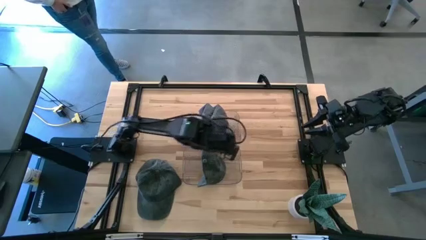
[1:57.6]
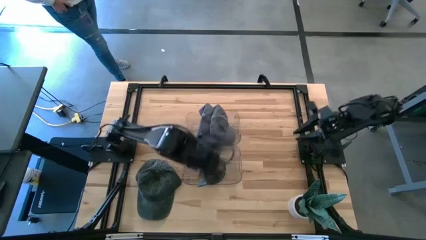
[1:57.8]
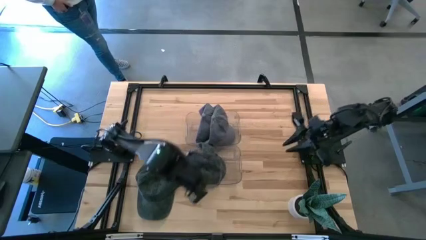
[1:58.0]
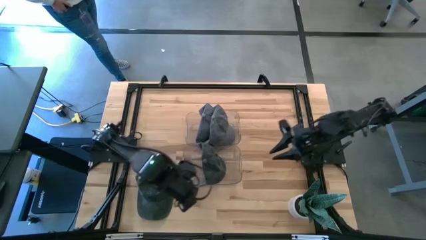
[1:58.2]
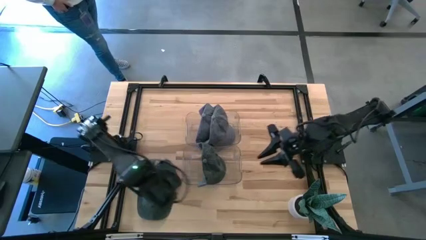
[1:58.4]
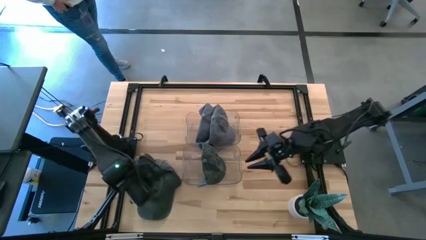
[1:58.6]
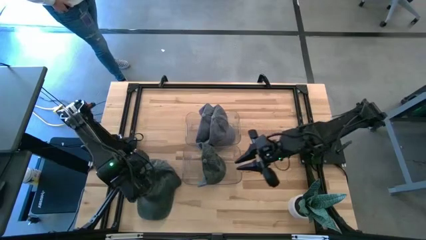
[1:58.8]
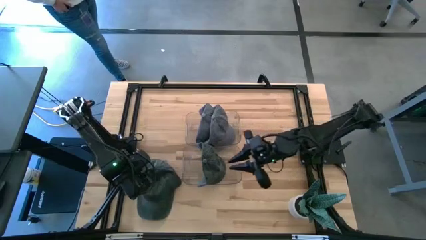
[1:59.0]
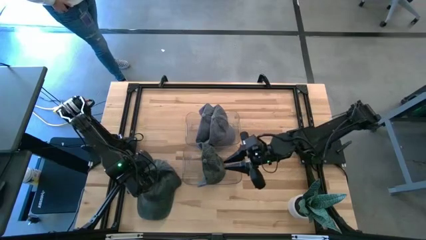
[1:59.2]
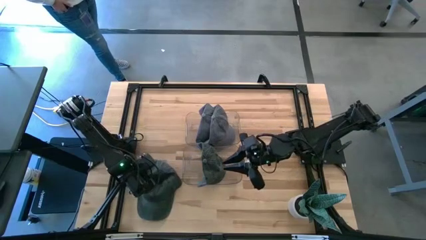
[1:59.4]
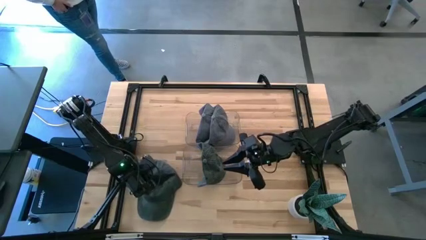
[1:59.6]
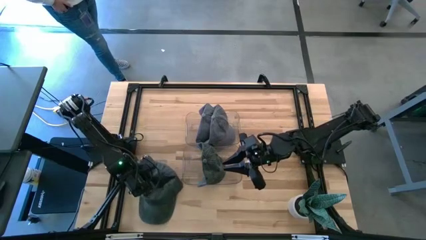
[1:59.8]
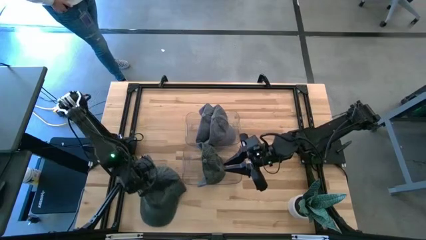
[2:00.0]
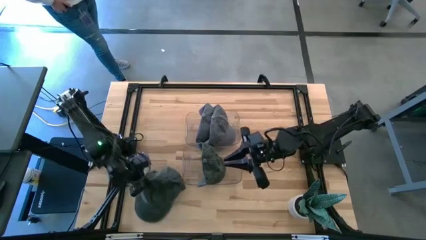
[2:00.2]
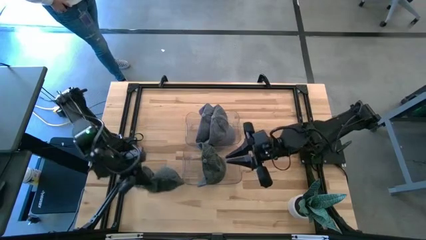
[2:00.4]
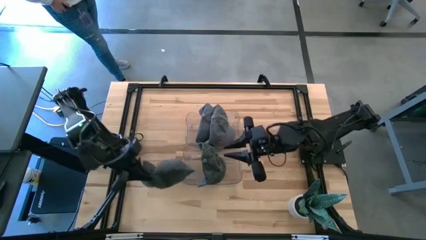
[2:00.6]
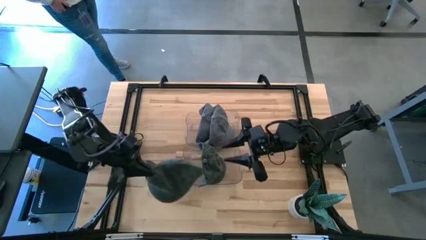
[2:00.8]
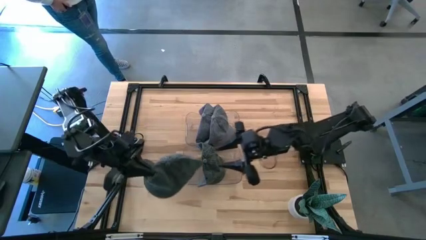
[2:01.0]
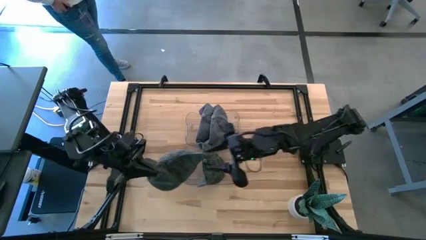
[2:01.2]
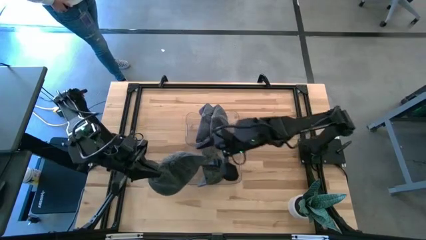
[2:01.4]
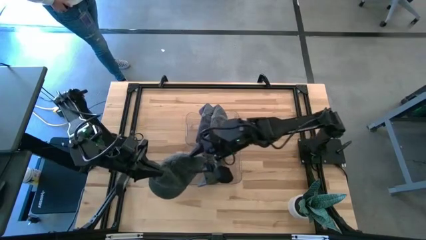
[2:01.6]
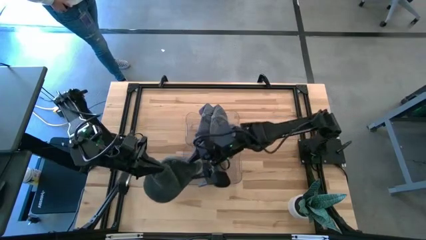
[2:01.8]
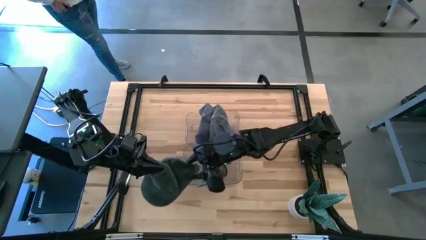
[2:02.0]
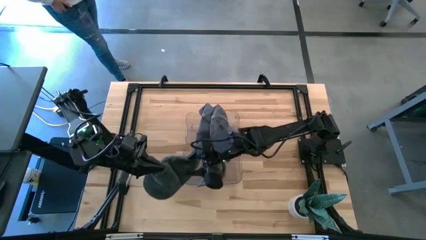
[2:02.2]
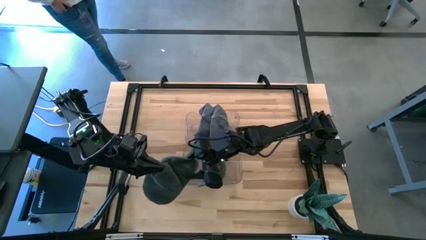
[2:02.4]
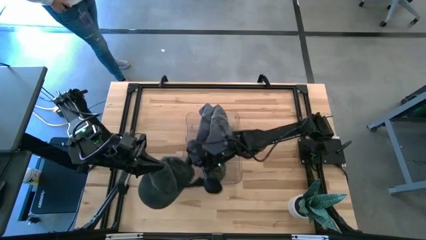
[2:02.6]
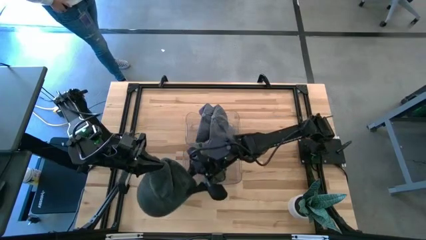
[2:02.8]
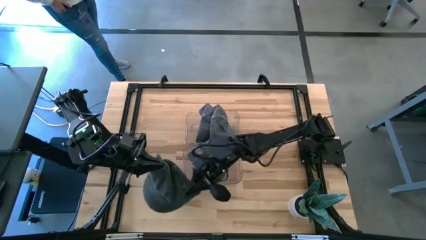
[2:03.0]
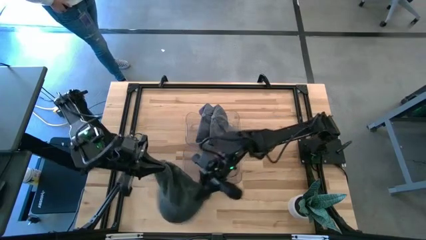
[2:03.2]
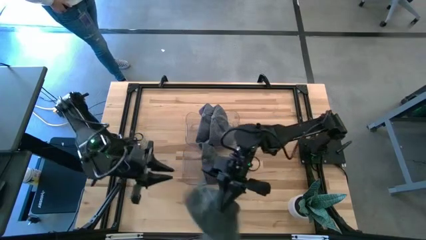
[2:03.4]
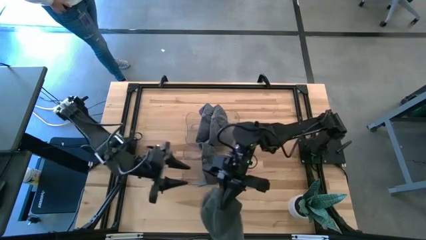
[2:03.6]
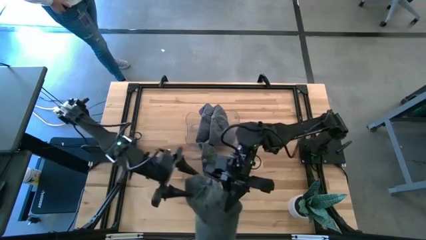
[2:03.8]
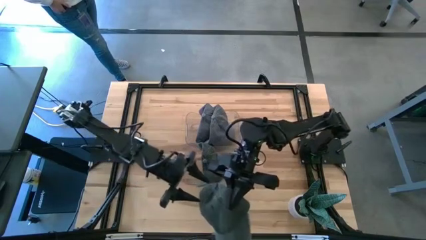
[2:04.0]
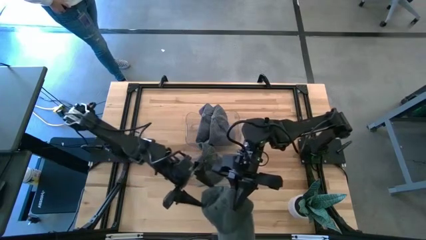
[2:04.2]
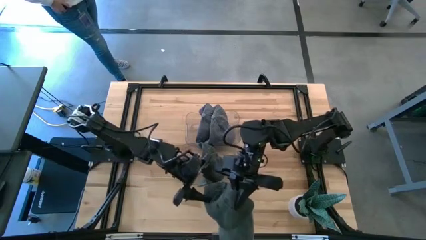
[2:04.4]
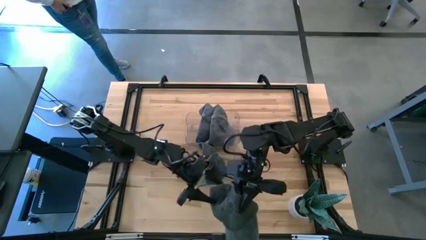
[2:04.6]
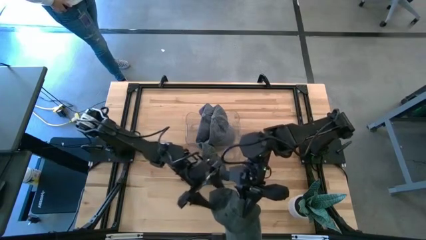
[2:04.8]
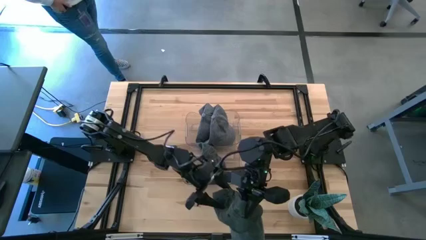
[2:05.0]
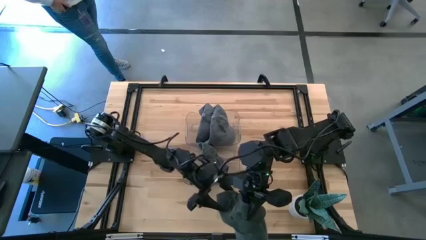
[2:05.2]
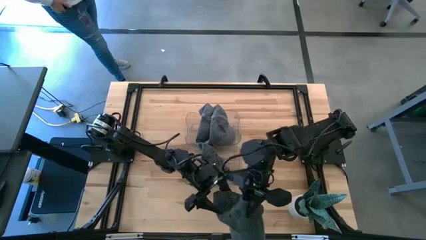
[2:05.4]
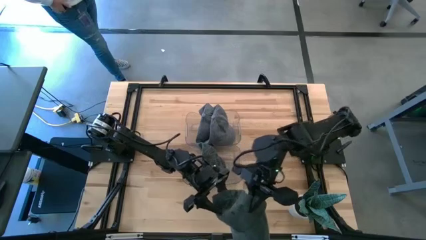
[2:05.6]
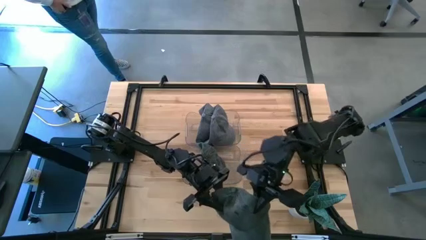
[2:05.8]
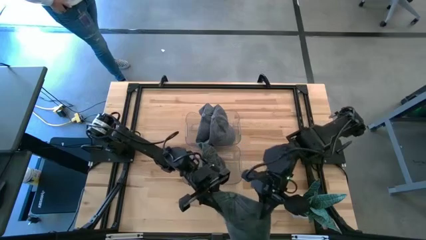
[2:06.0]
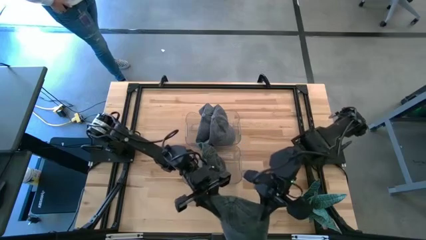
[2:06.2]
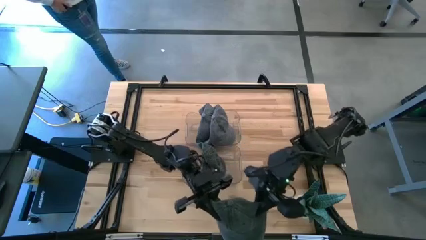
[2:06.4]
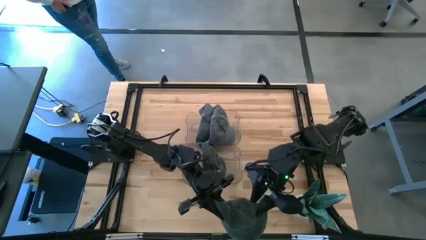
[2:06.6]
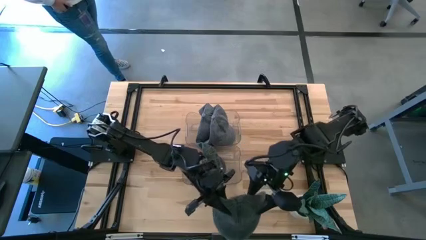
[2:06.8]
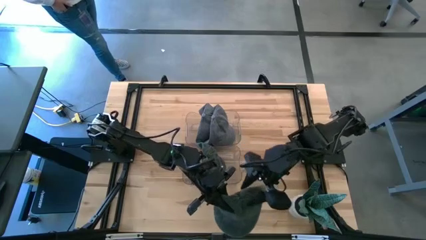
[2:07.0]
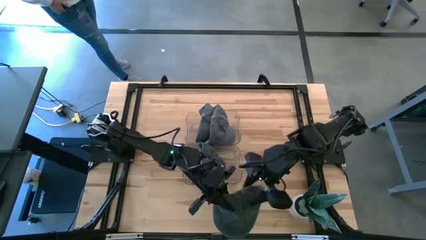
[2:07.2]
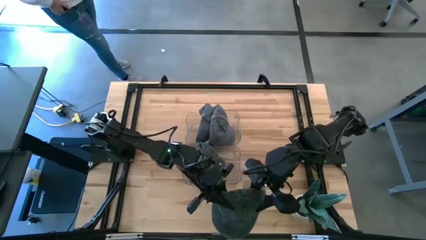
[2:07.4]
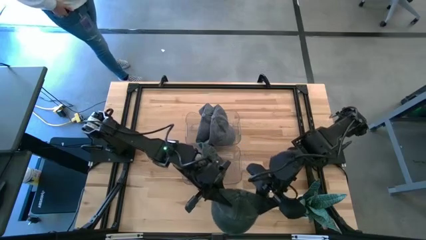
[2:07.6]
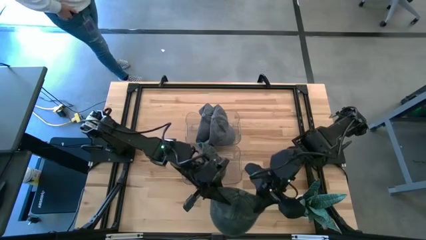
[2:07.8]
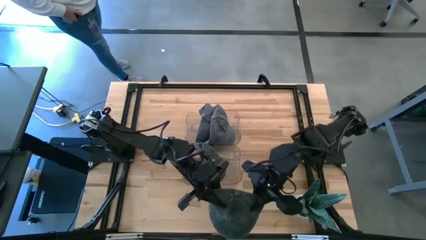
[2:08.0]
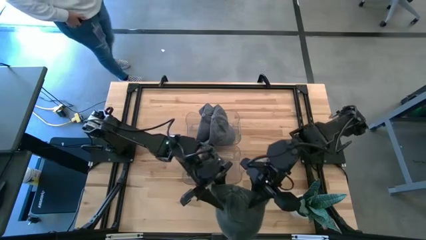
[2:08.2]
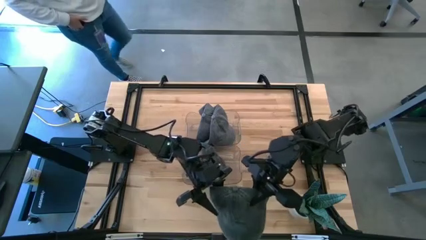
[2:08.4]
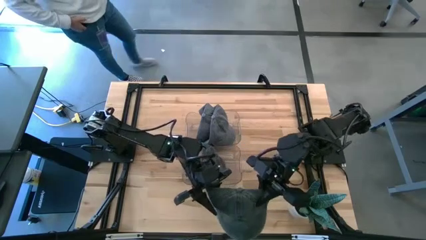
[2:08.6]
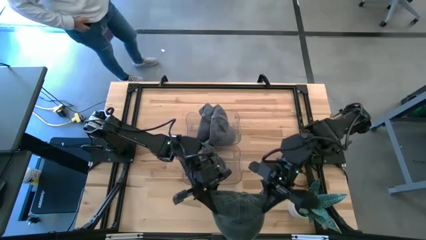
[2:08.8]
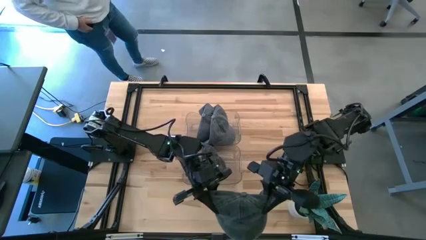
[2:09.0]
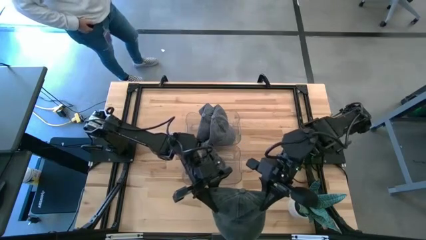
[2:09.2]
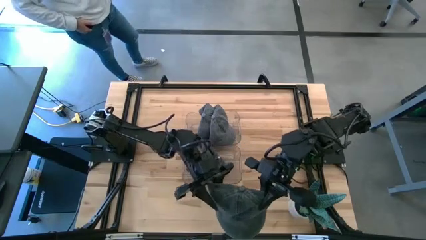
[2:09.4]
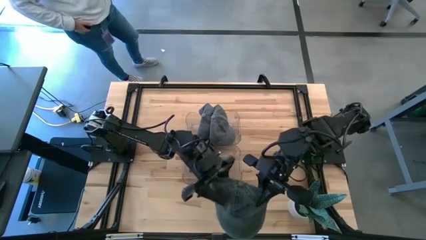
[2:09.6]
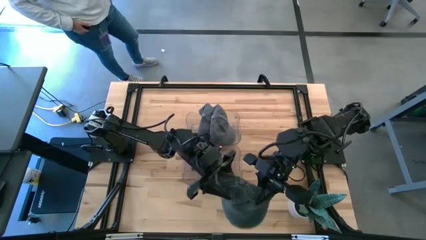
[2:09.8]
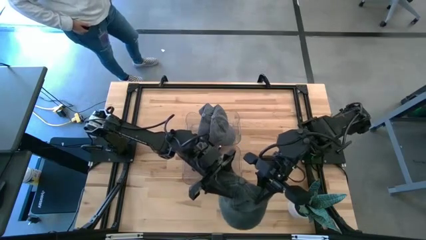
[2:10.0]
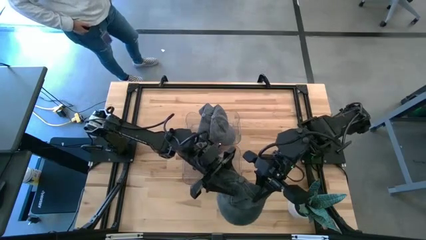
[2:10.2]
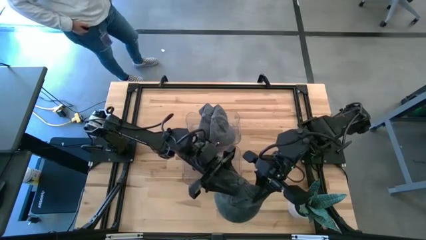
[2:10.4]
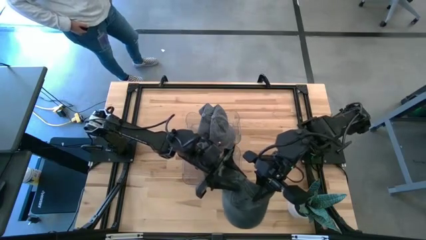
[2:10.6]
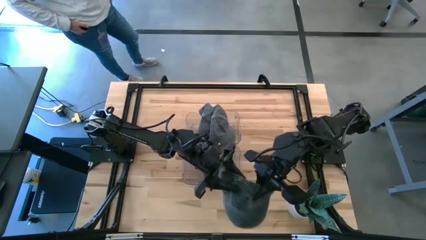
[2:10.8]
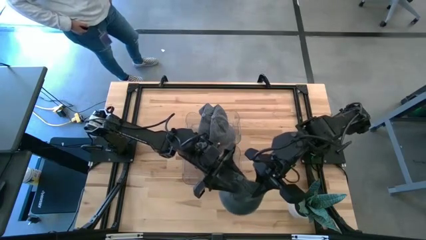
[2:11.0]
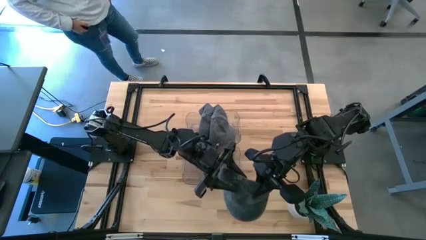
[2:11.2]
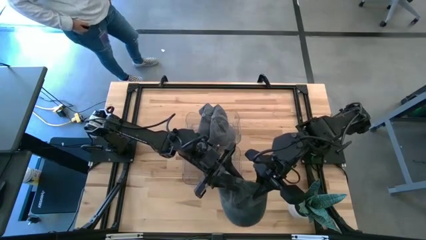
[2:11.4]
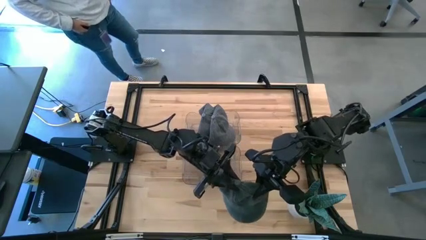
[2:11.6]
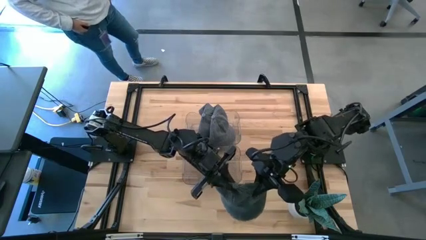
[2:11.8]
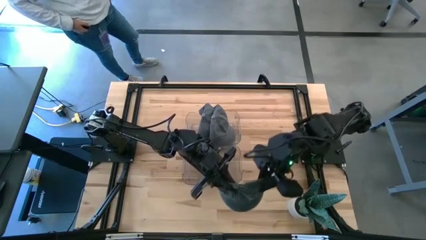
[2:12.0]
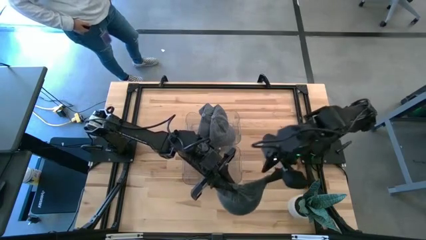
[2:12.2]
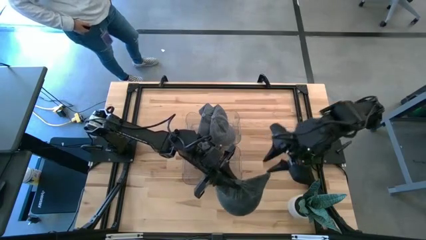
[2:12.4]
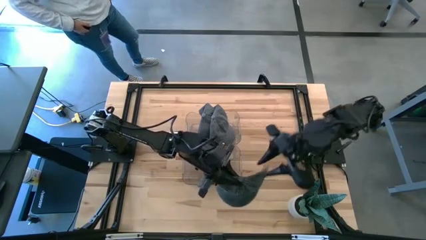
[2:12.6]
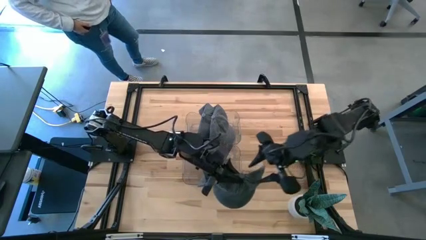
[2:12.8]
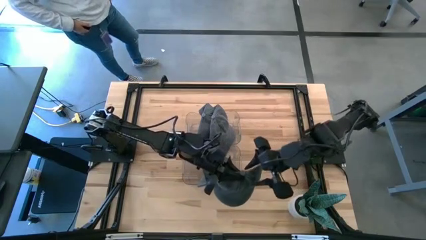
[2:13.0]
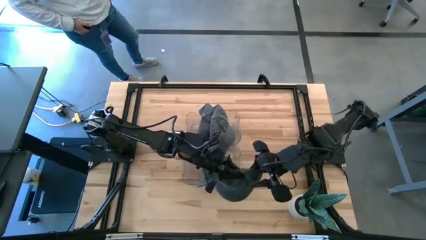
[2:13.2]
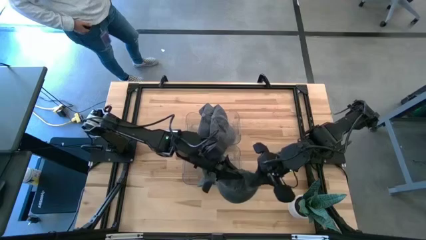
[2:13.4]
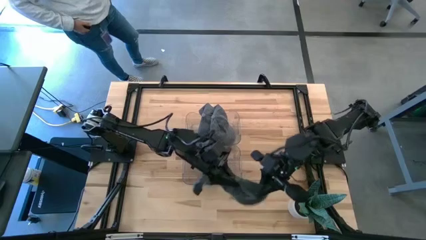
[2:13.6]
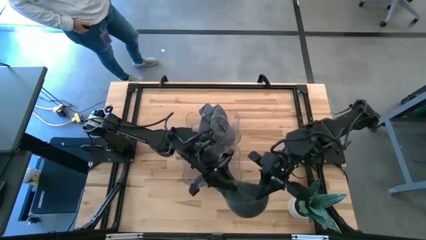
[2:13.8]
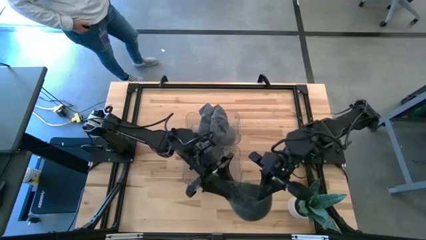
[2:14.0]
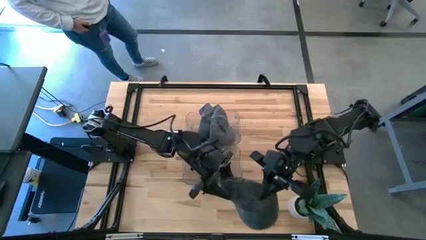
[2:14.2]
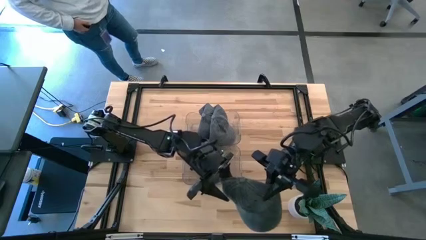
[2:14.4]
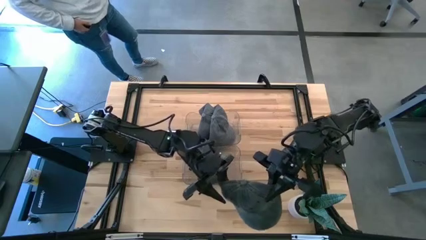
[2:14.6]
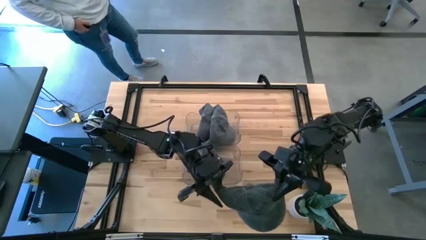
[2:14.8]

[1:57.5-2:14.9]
Task: Pick & Place hat
Put the black cap into the bottom transparent bin
